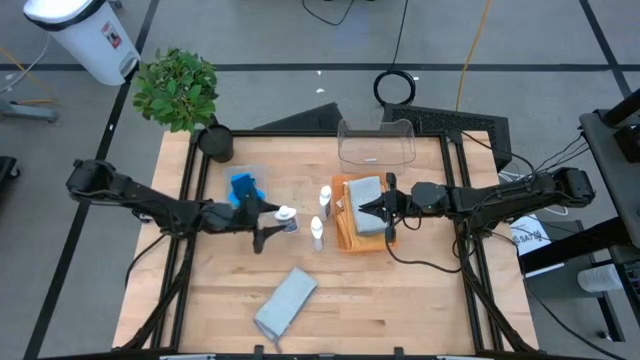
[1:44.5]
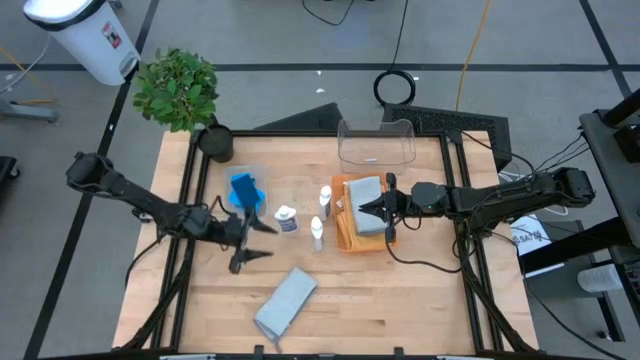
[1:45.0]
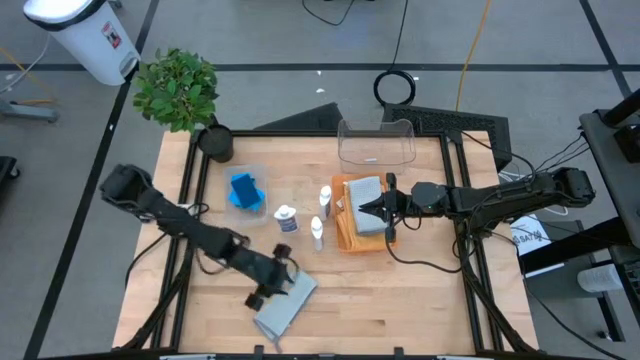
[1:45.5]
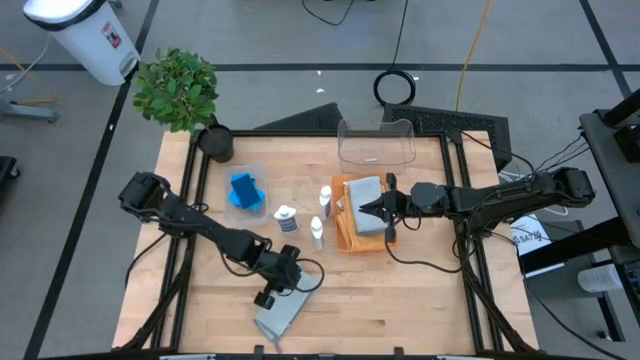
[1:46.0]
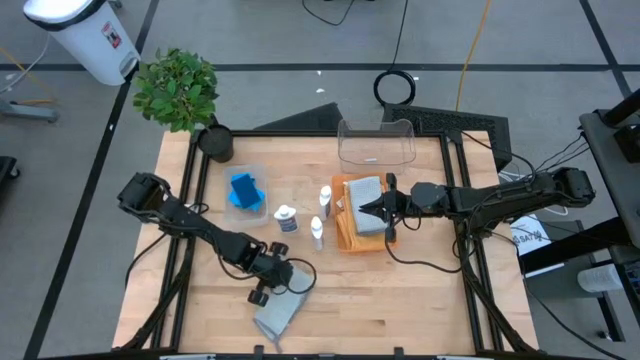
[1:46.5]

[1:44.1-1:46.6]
Task: Pick & Place Kitchen Items
Put the gray microfiber cloth into the orange bin

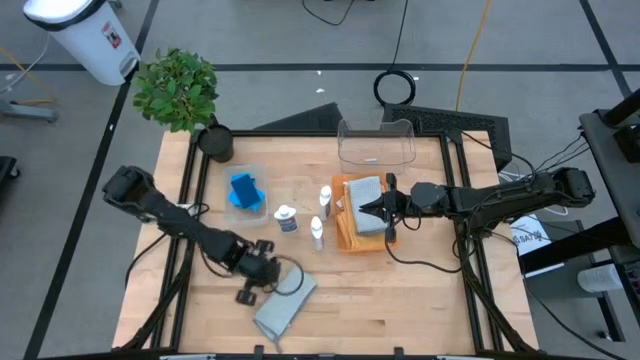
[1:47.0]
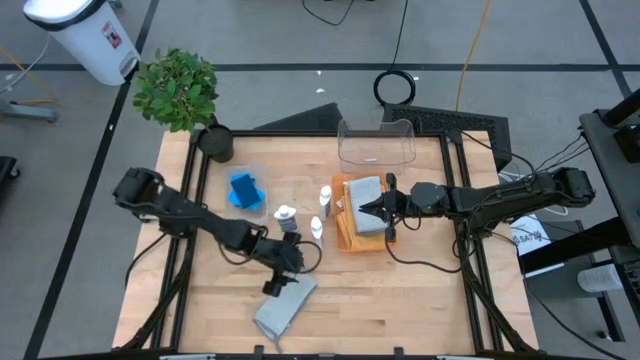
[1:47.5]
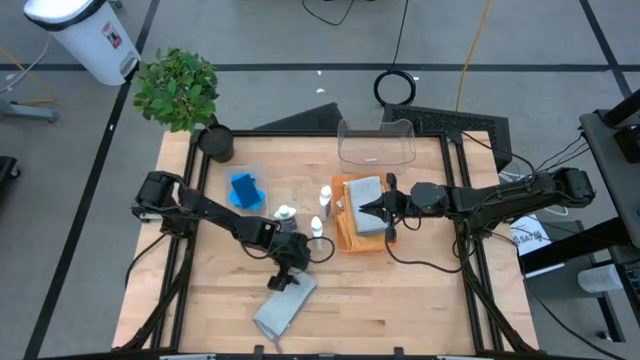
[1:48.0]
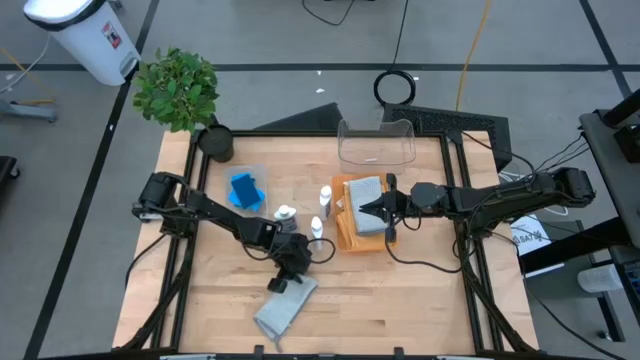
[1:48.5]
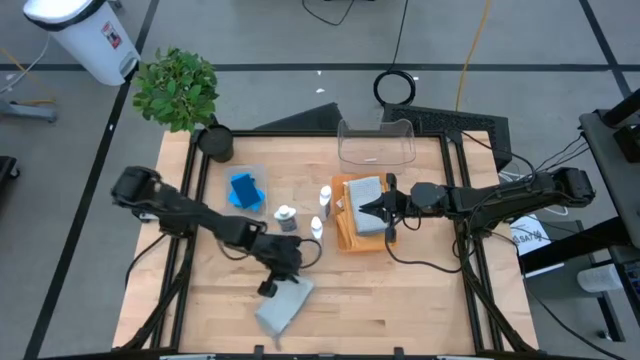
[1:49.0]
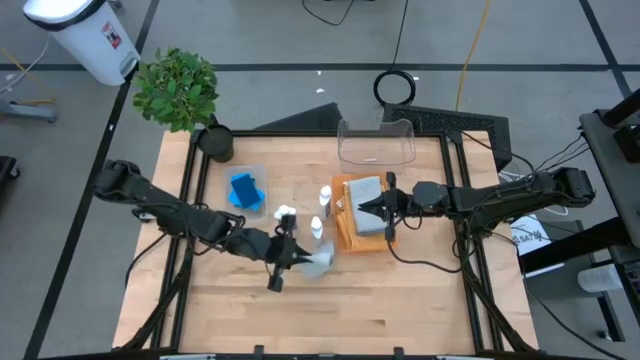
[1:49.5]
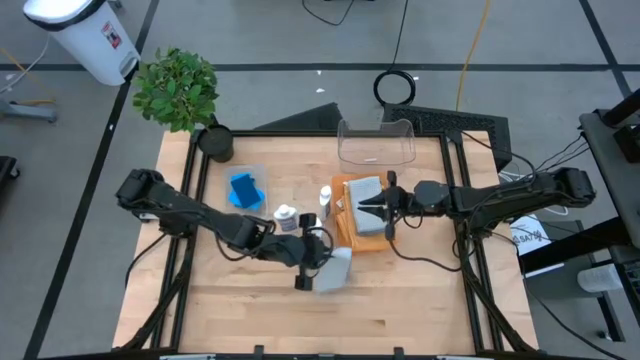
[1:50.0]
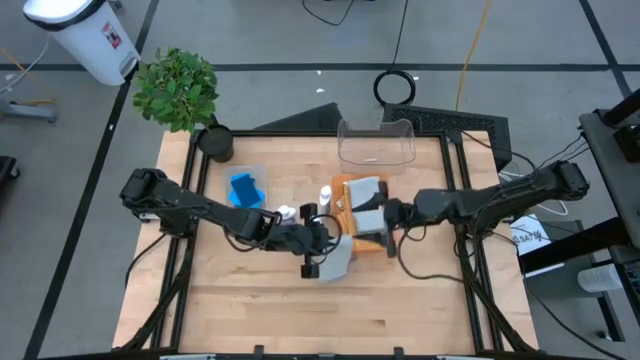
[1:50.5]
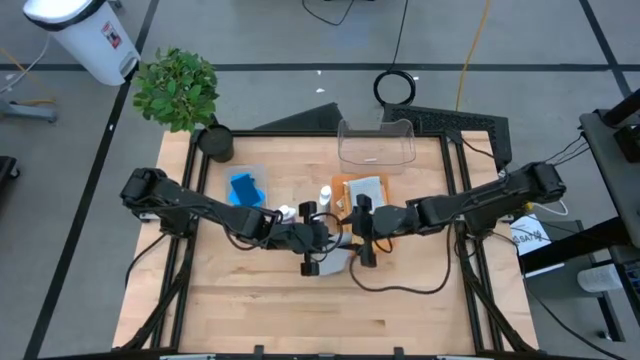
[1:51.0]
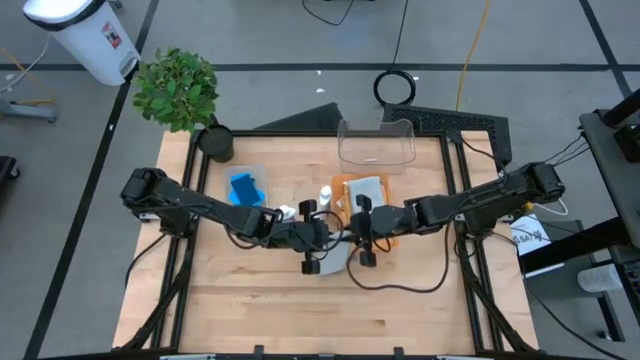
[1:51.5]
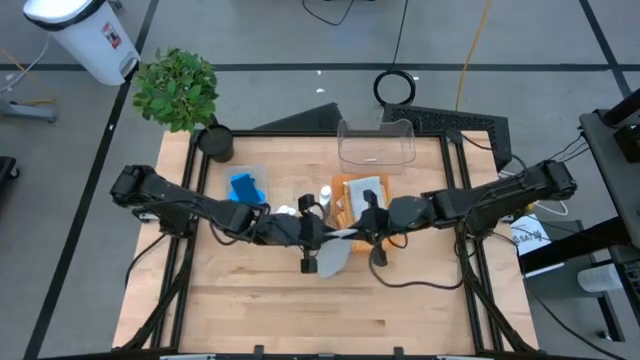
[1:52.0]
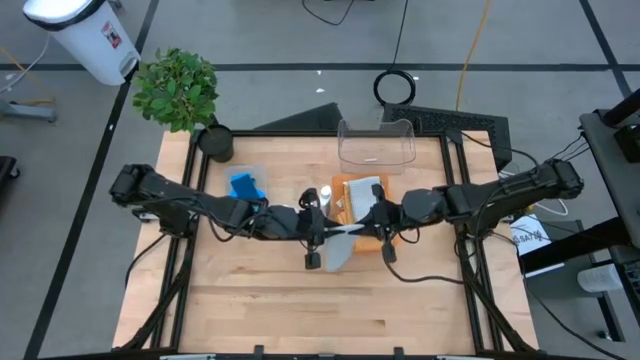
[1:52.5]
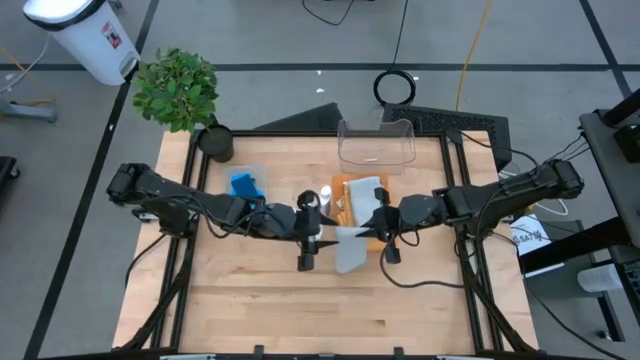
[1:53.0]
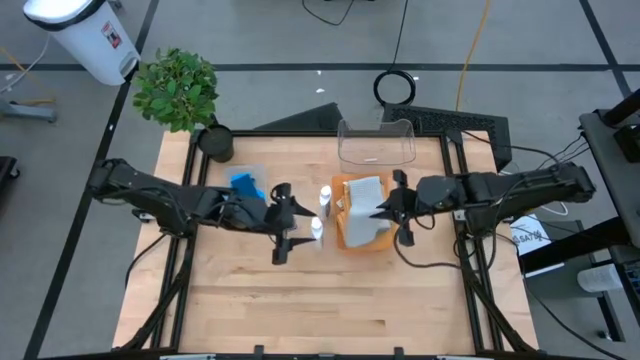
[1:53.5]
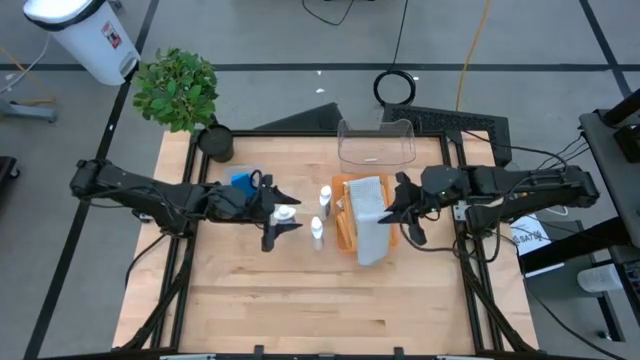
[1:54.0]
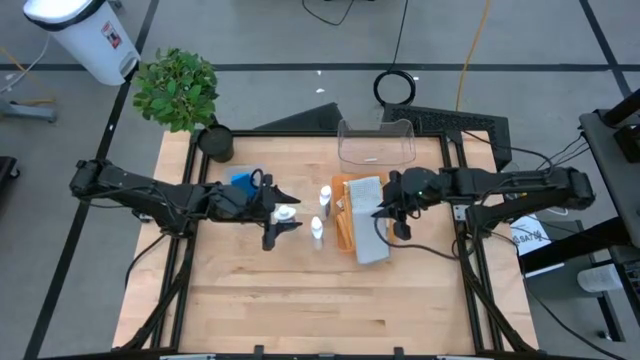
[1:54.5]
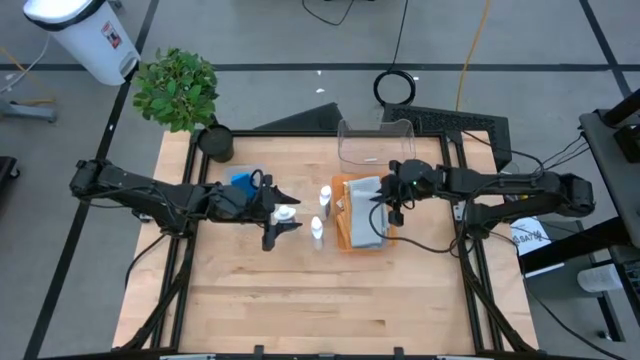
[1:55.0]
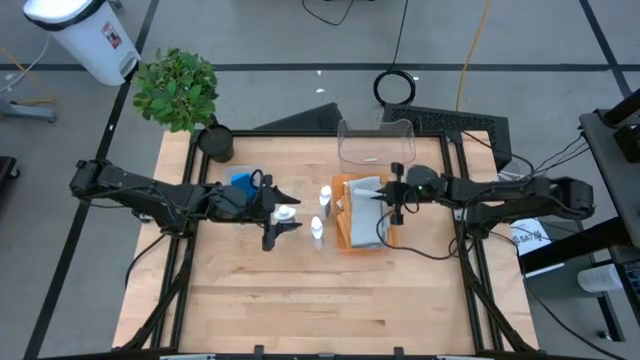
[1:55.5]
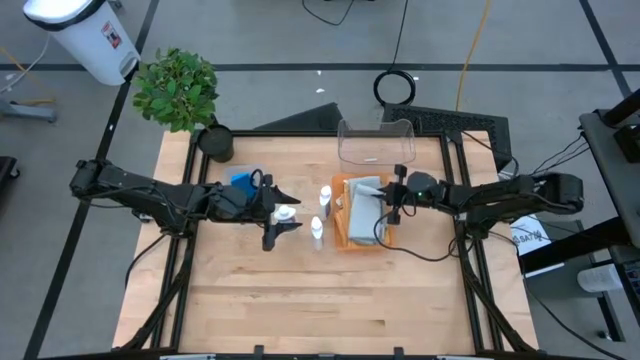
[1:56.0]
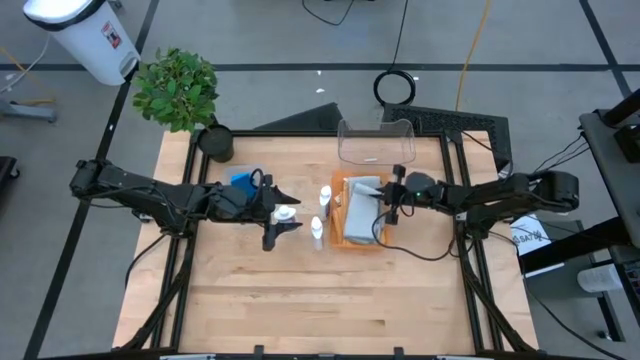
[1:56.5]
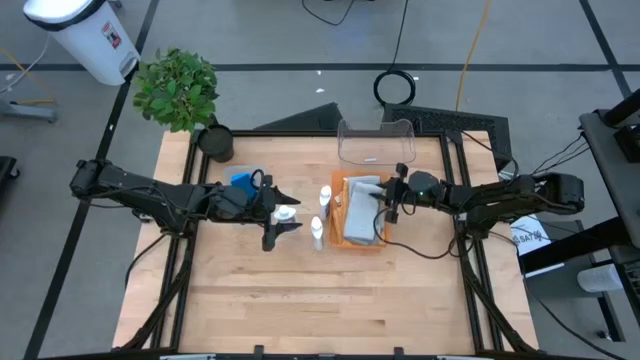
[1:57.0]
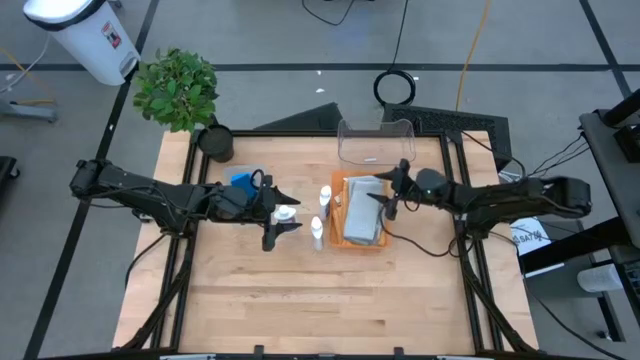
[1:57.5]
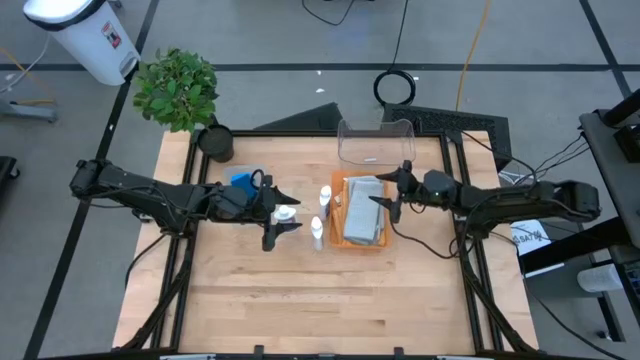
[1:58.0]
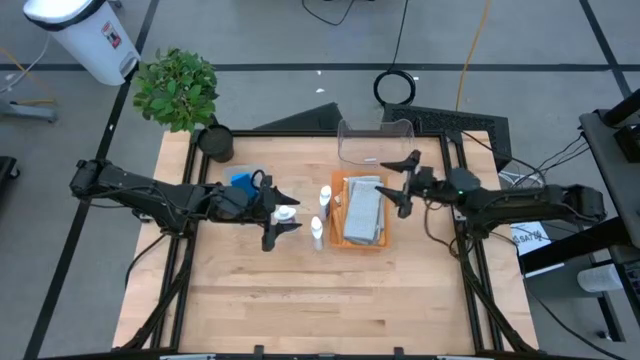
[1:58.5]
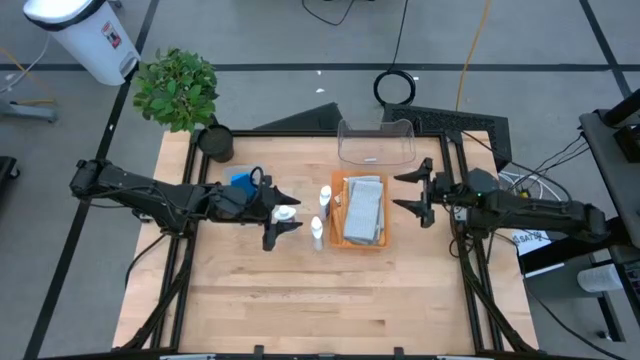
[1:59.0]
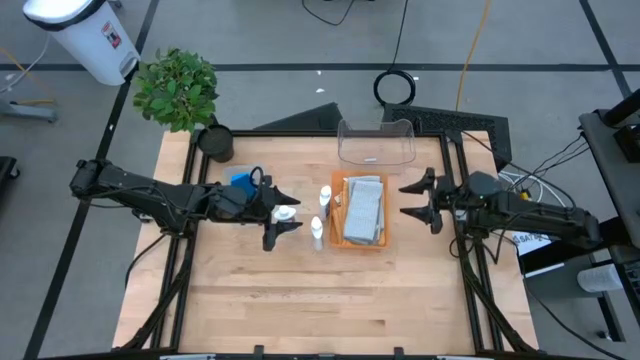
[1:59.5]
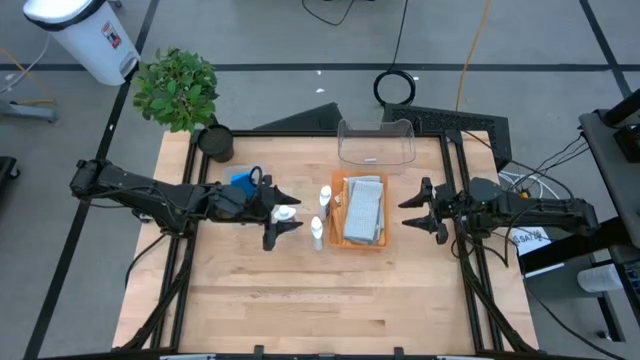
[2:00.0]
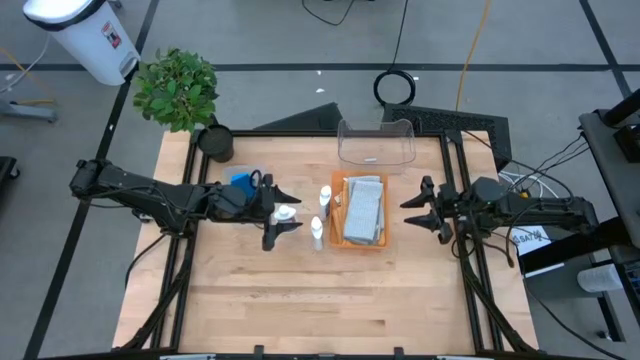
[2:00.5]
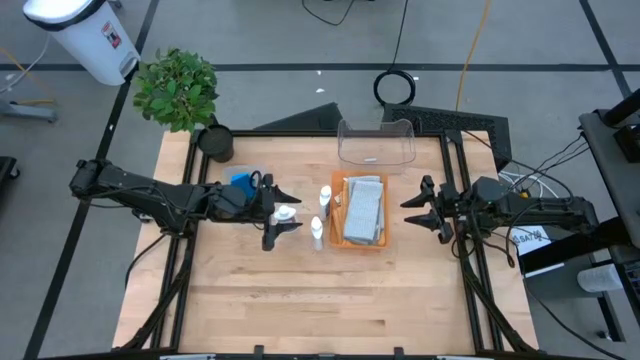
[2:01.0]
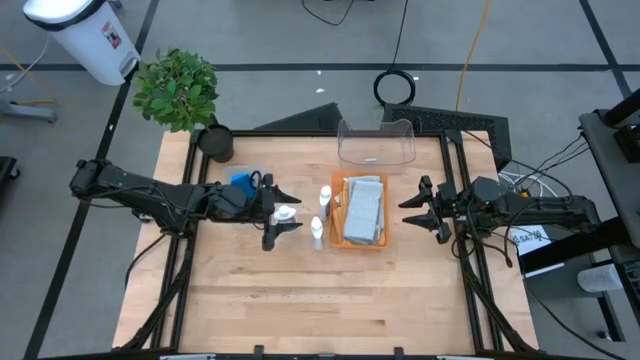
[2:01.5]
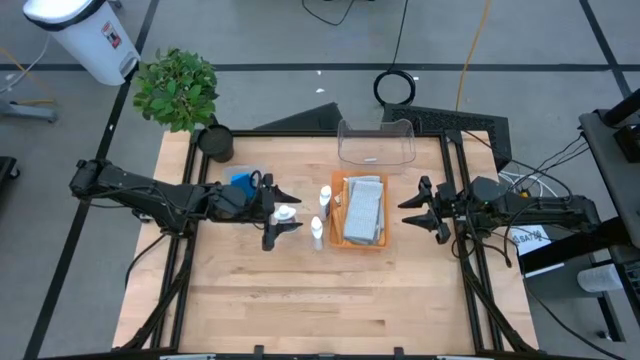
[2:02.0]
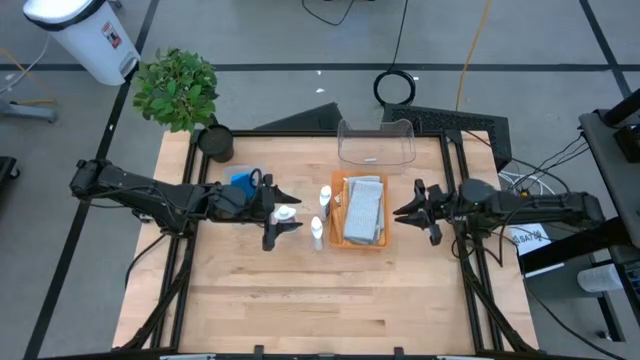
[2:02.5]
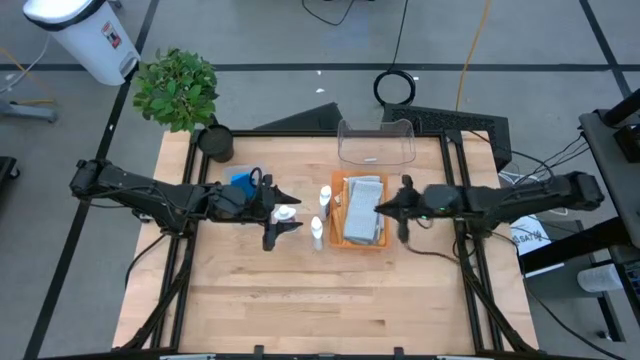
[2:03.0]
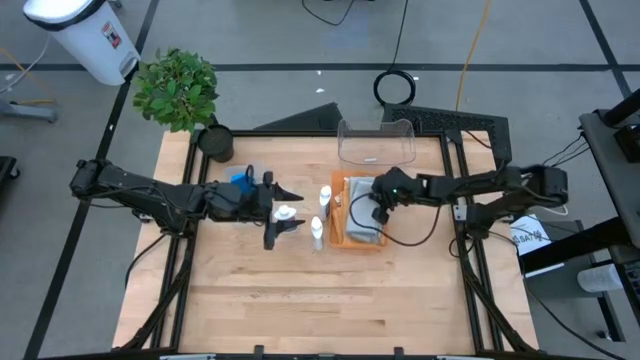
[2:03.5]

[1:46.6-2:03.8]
Put the gray microfiber cloth into the orange bin

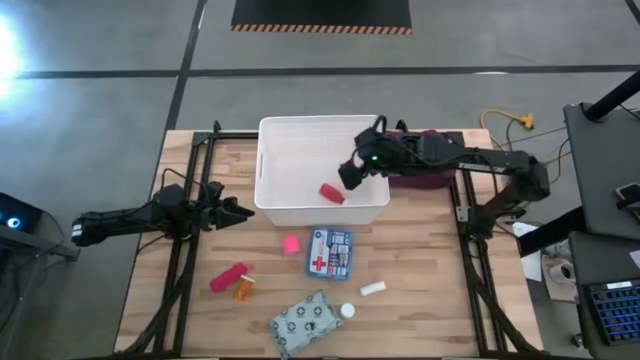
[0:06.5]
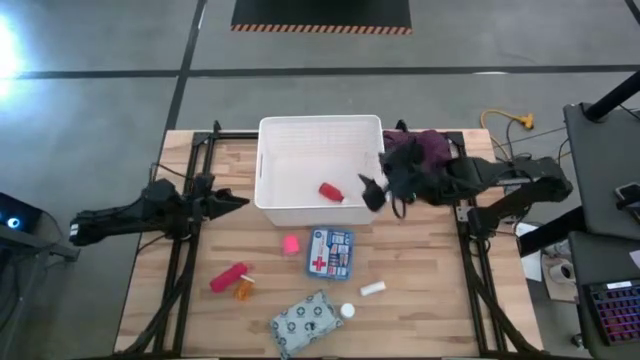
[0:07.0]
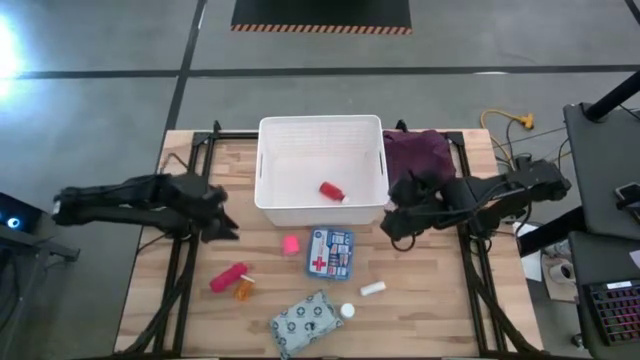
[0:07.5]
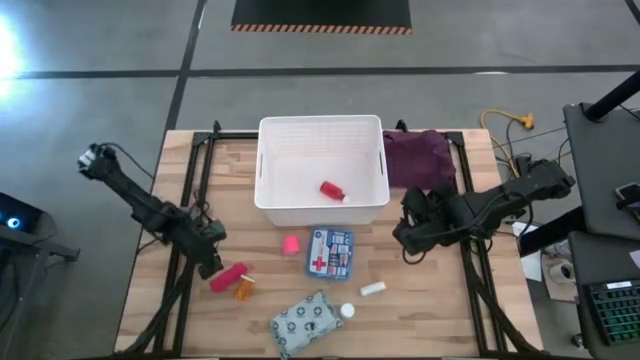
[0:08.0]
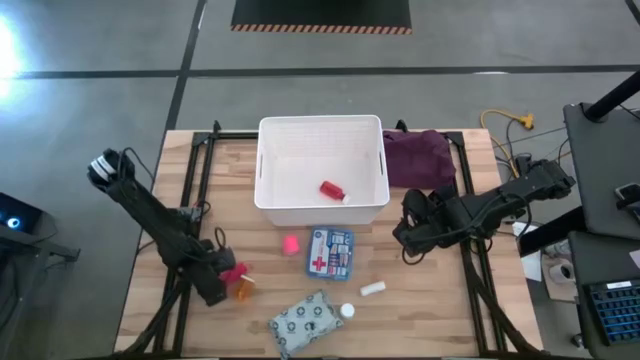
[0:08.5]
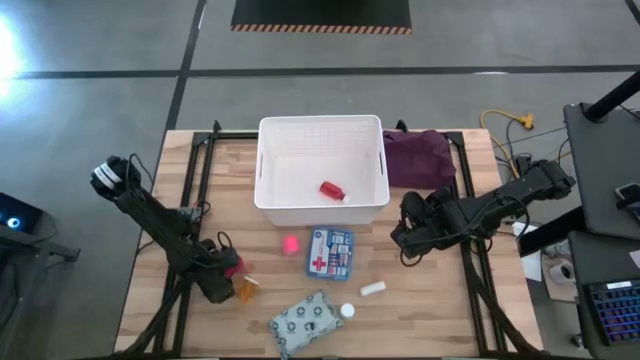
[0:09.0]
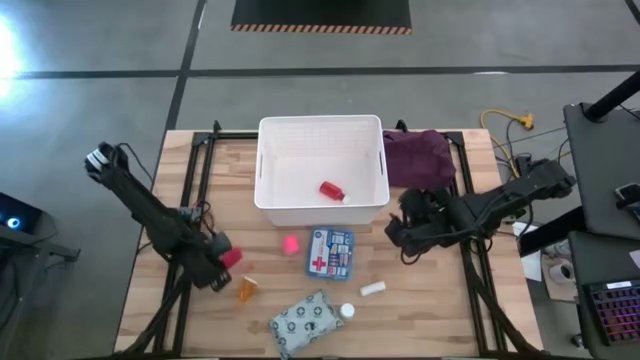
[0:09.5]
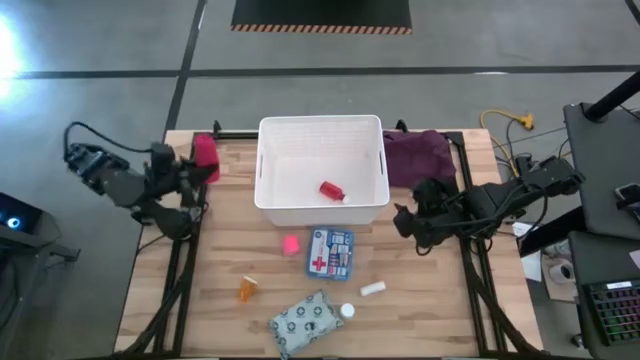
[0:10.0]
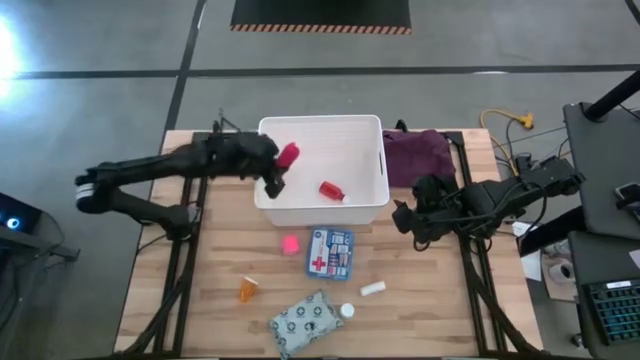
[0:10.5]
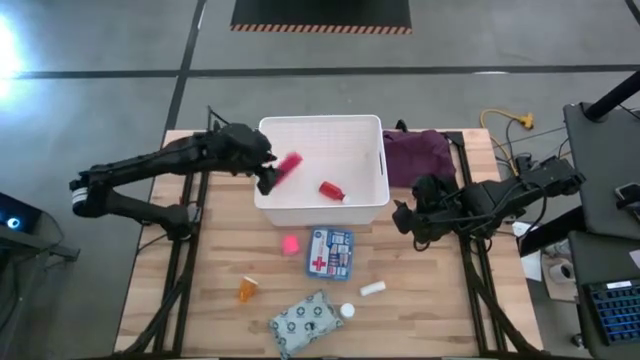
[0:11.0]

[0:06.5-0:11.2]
Task: Pick & place medical supplies in basket/bin
Put the red bandage into the white bin
